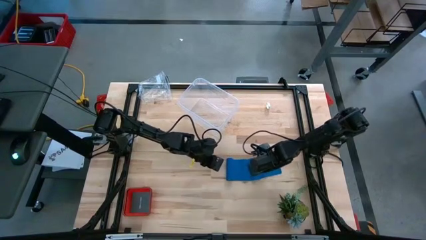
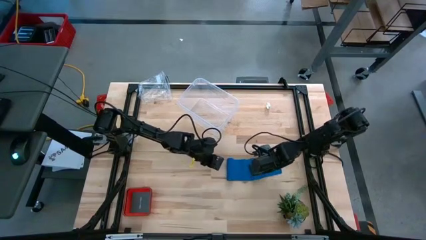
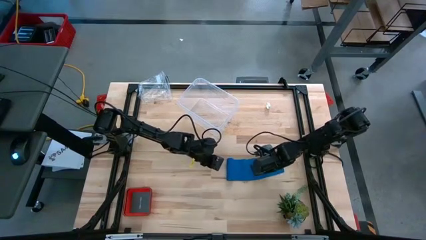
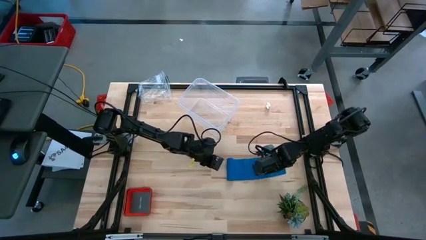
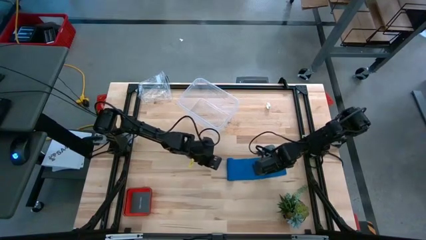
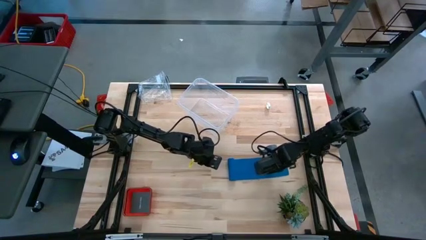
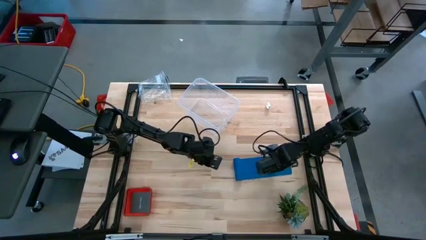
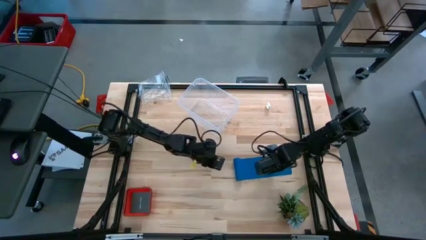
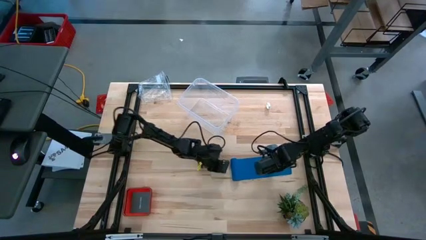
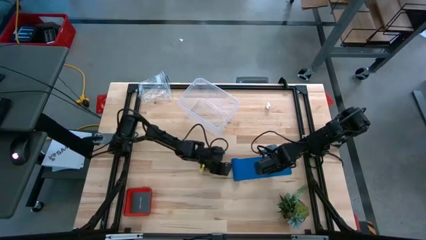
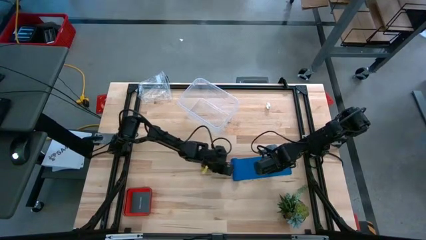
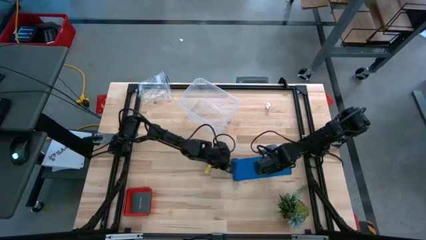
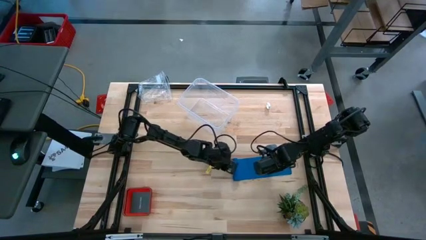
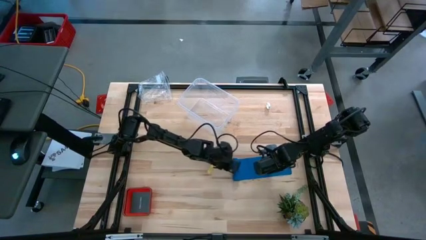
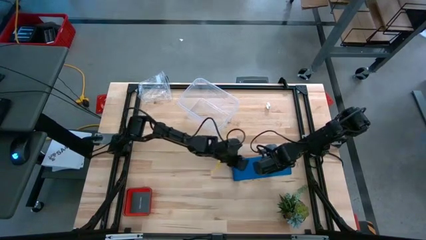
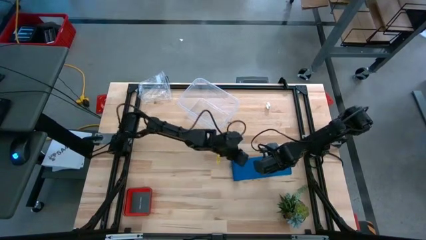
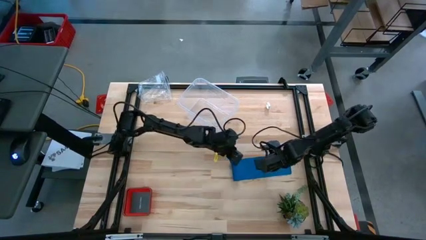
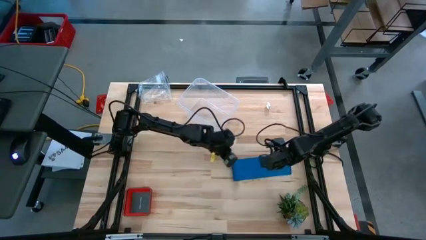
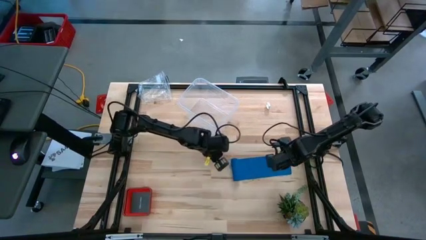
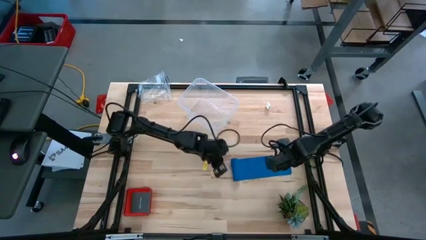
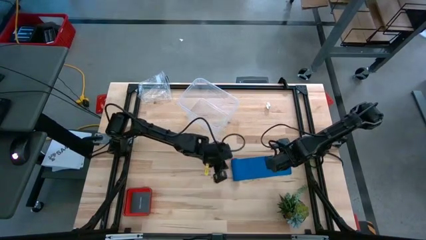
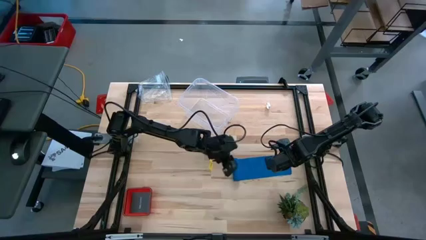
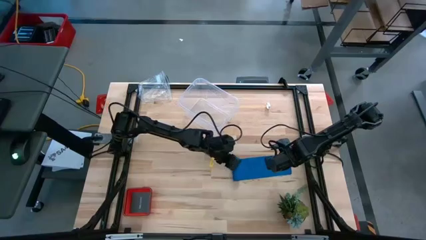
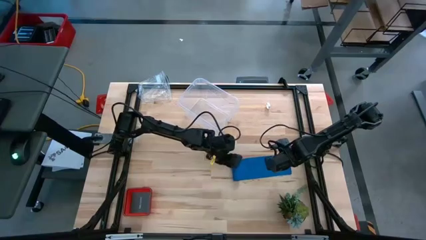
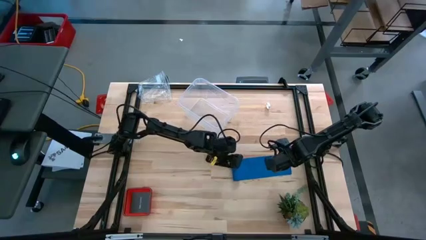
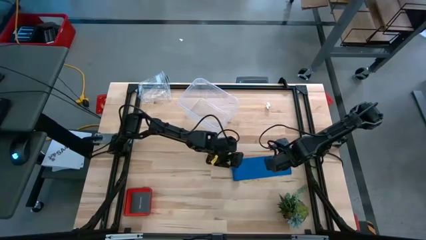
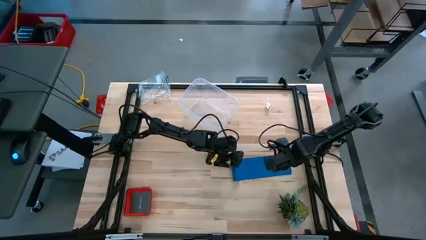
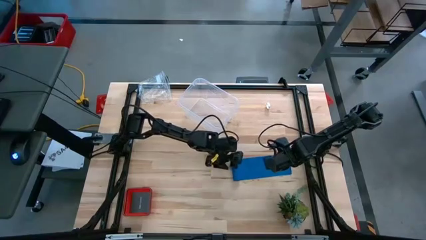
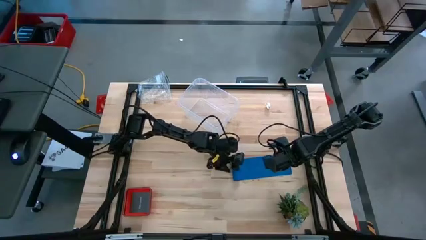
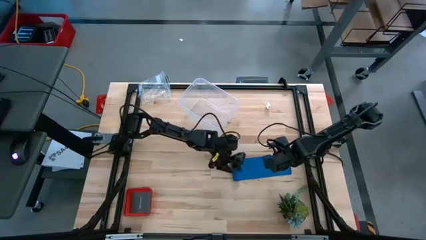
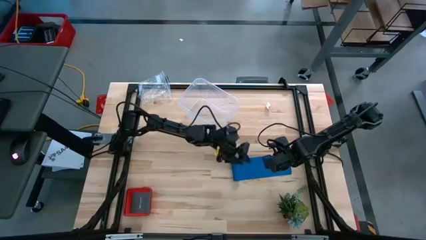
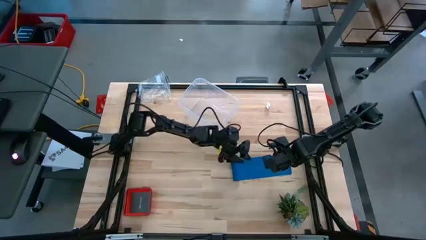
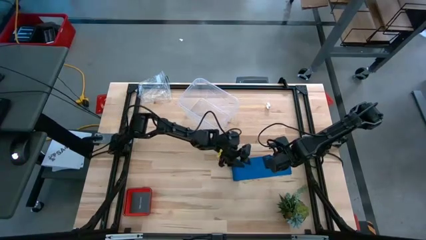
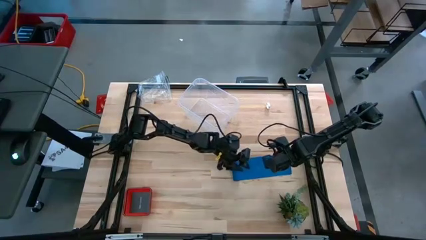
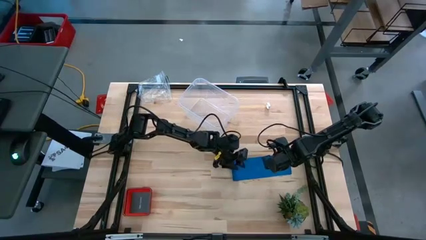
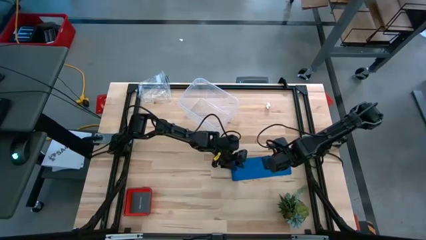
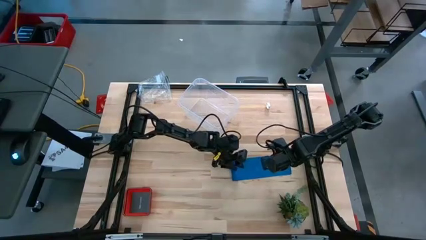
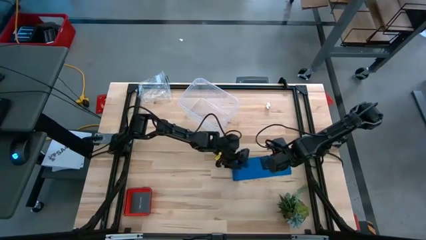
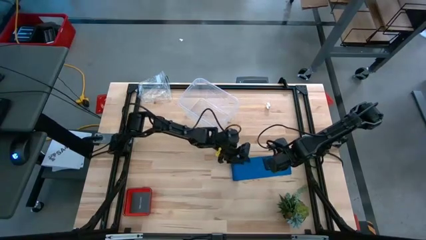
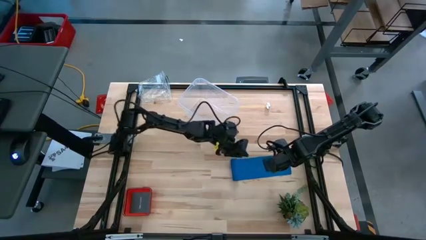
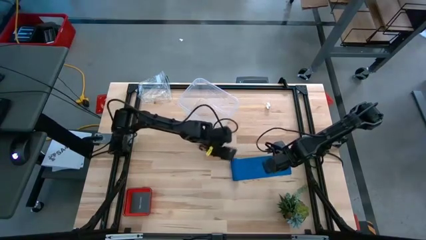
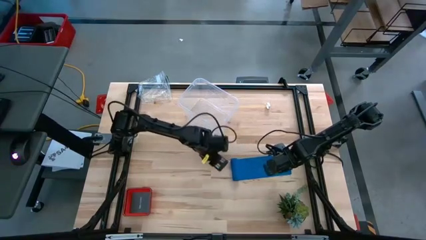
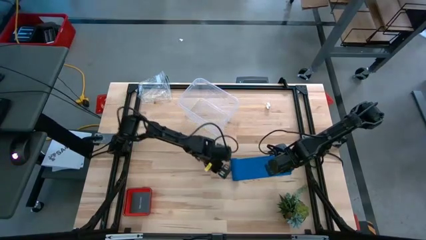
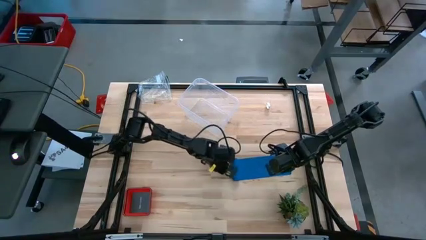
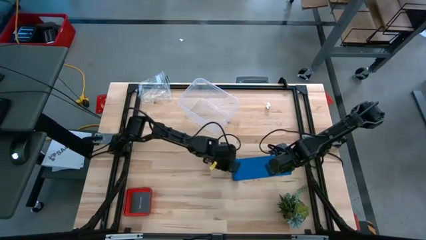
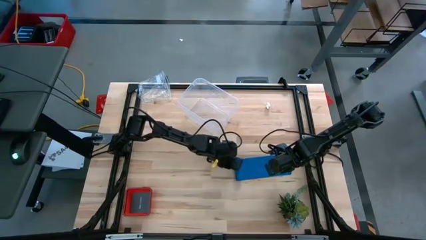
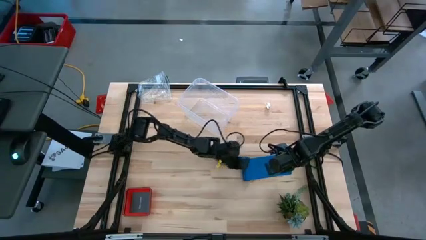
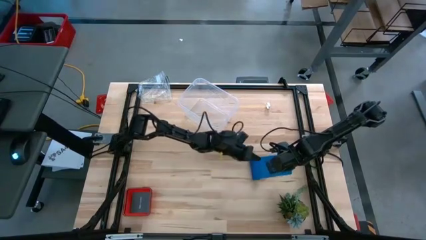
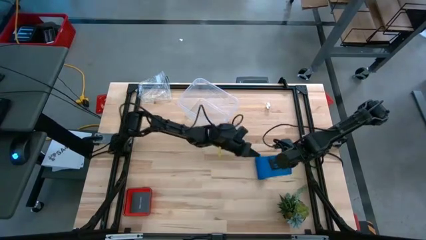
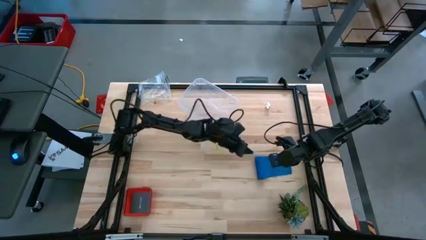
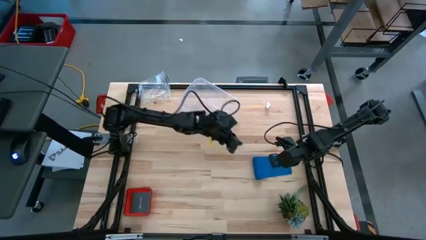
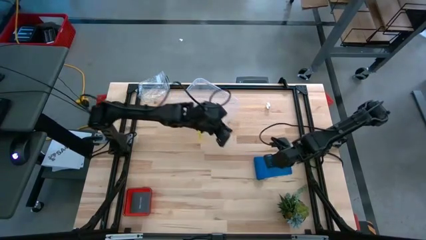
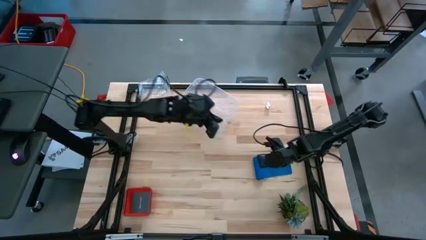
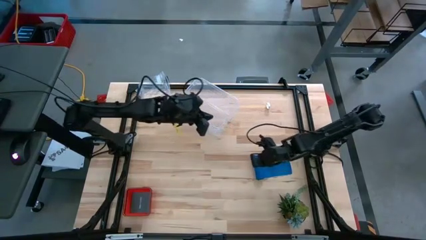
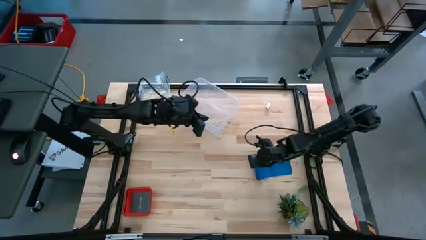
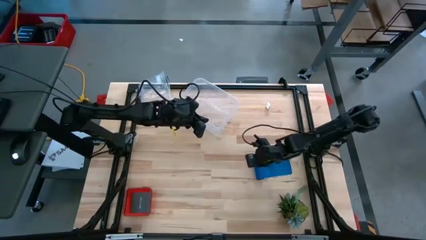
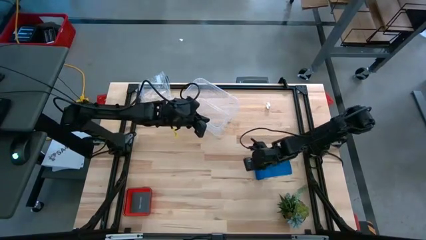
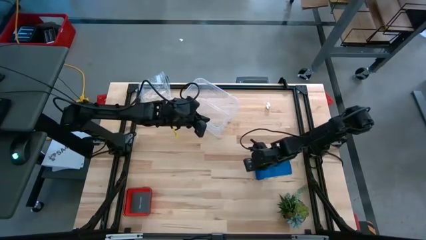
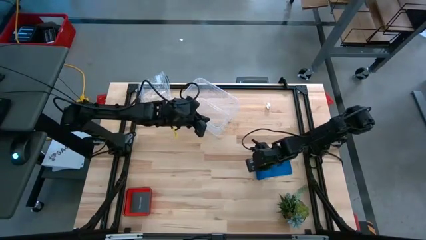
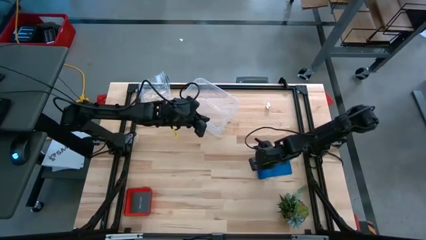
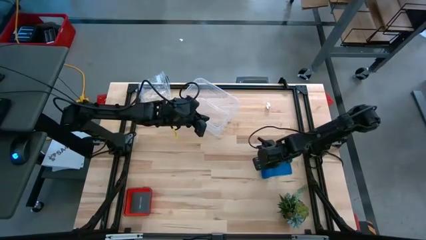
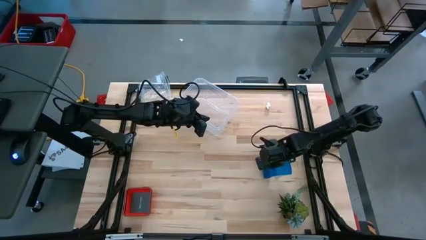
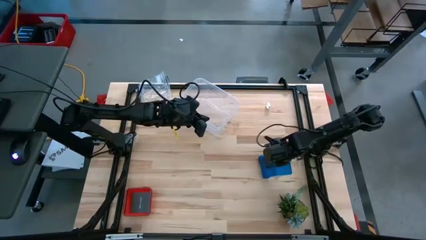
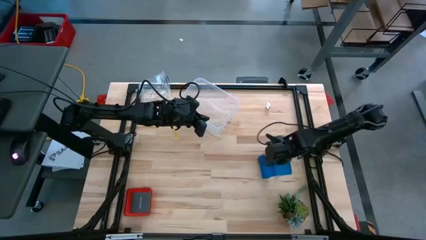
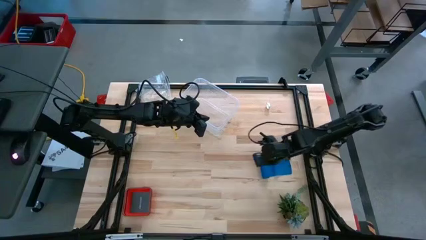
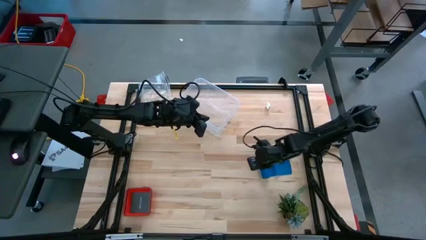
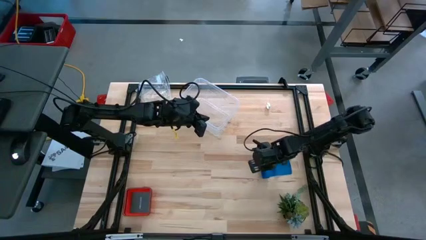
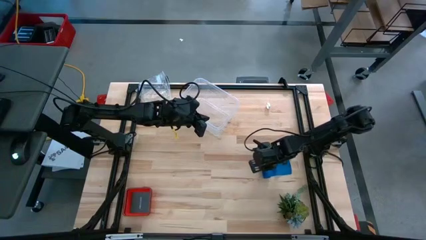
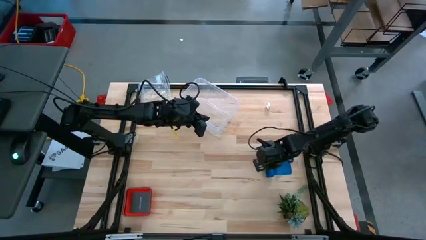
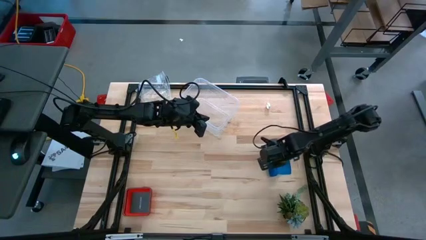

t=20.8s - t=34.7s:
Task: Roll bandage
Roll the blue bandage
